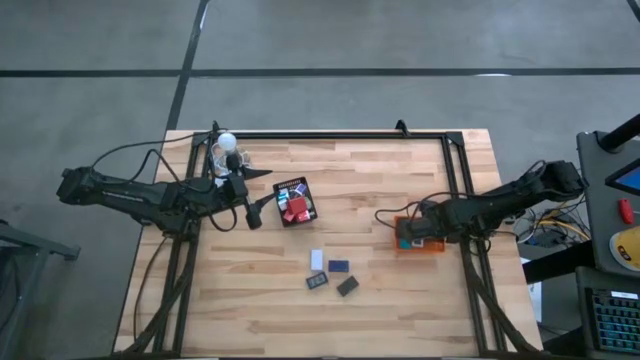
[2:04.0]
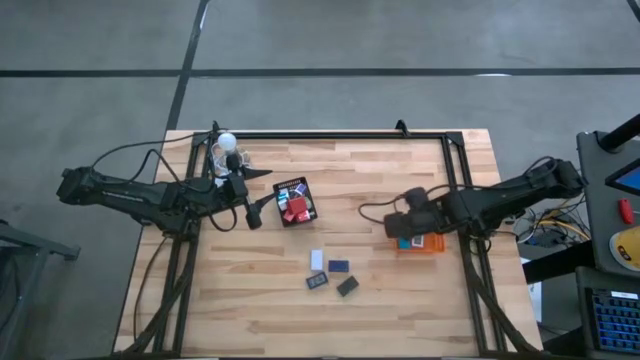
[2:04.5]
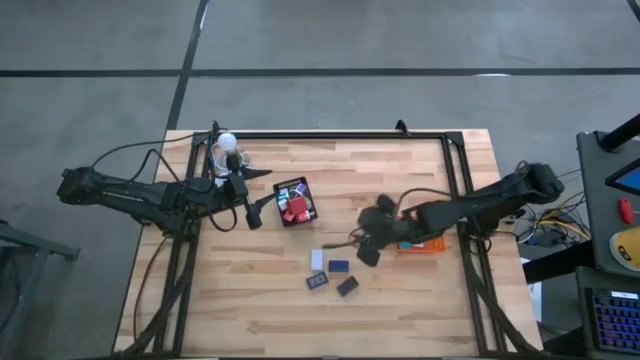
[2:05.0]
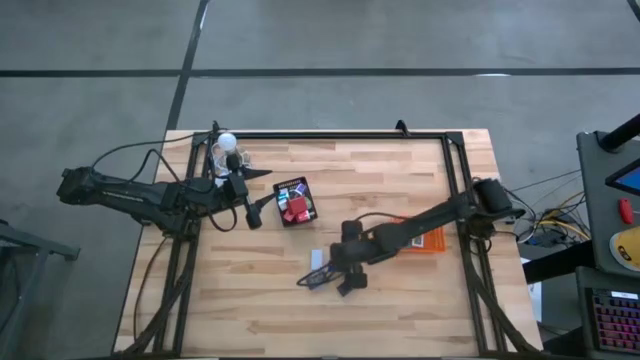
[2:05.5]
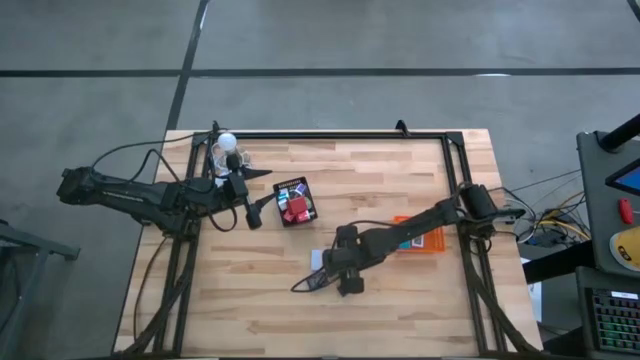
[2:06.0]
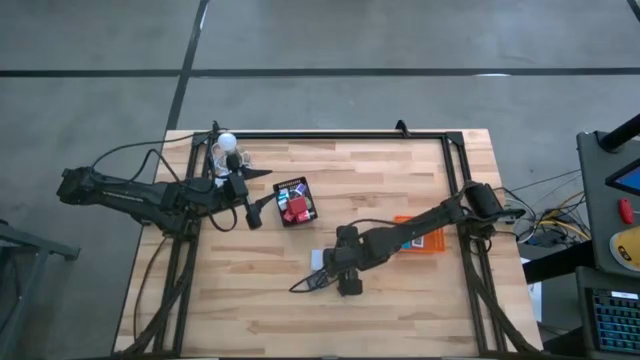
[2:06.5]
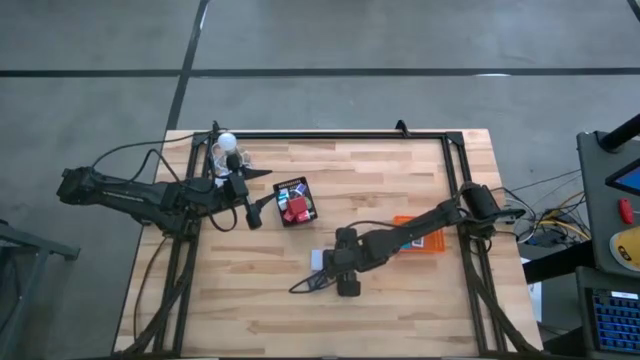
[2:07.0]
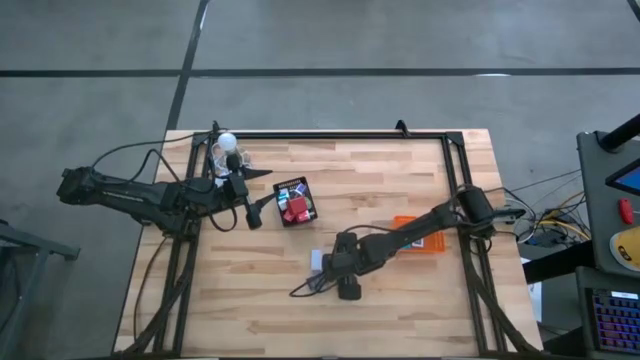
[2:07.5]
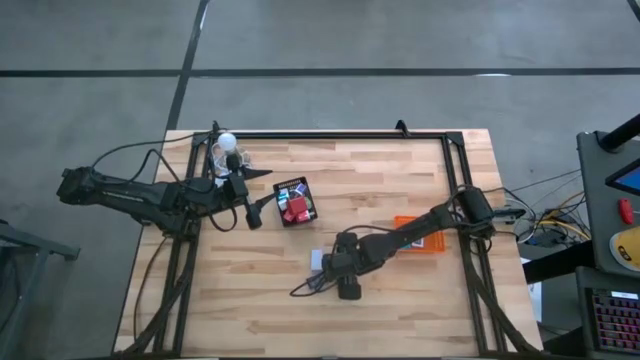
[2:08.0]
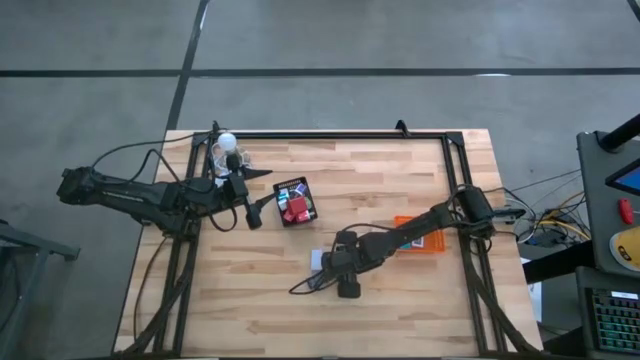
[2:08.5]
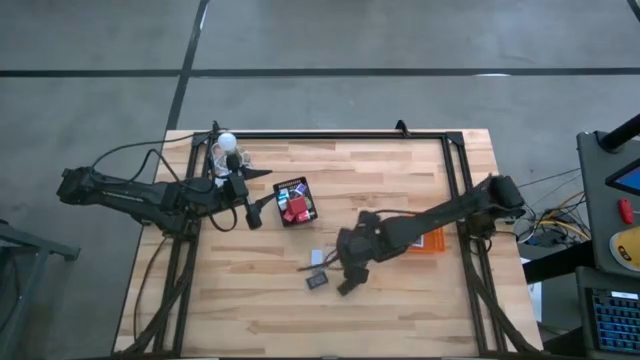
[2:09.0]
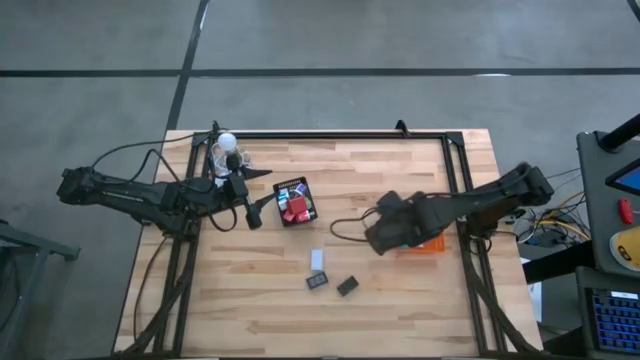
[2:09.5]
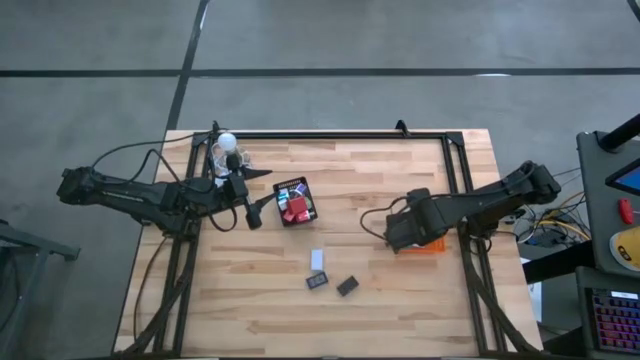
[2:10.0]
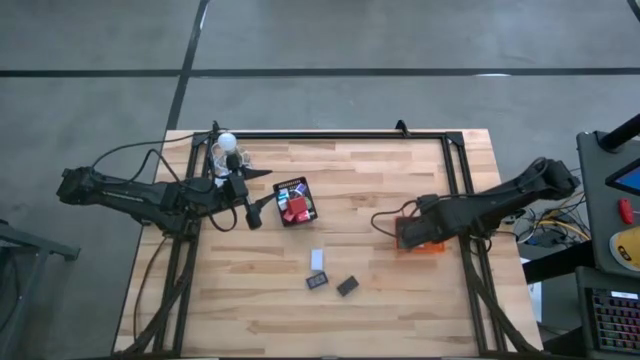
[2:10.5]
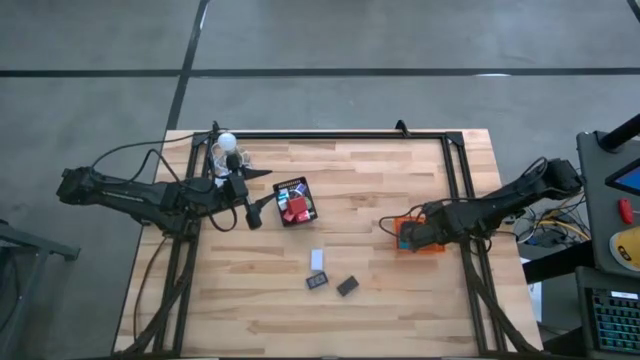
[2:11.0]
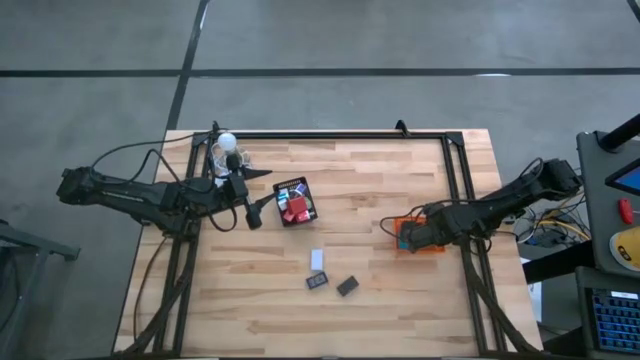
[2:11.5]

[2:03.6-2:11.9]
Task: Pick & Place Office items
Put the right dark blue digital clock in the orange bin

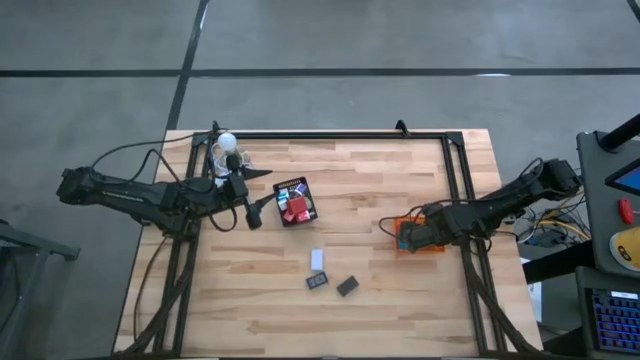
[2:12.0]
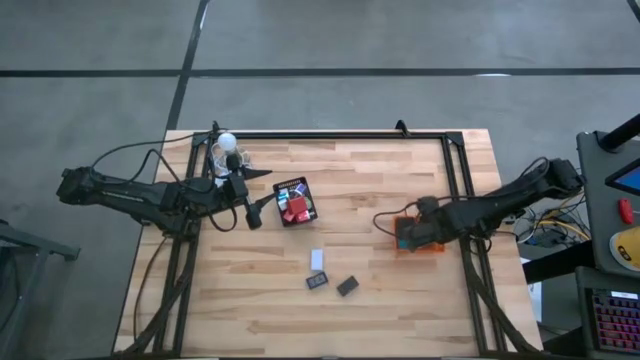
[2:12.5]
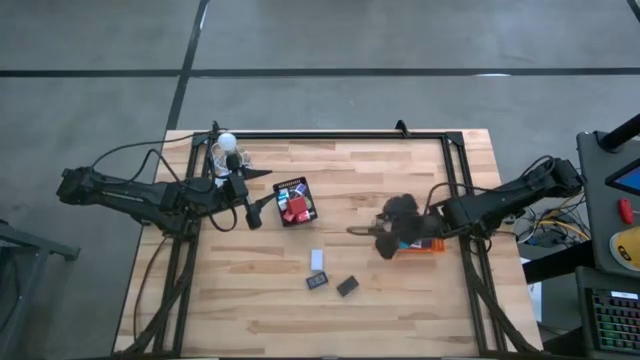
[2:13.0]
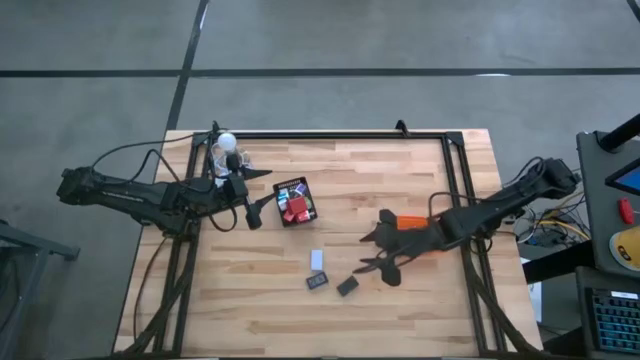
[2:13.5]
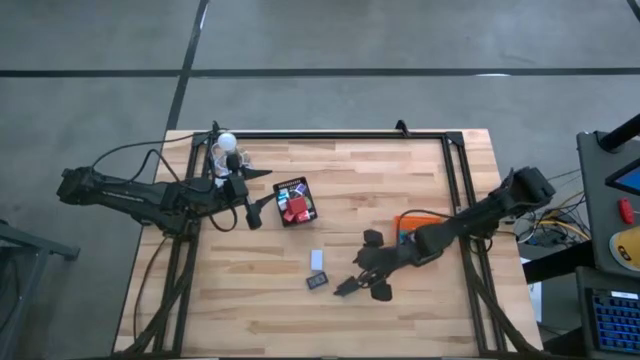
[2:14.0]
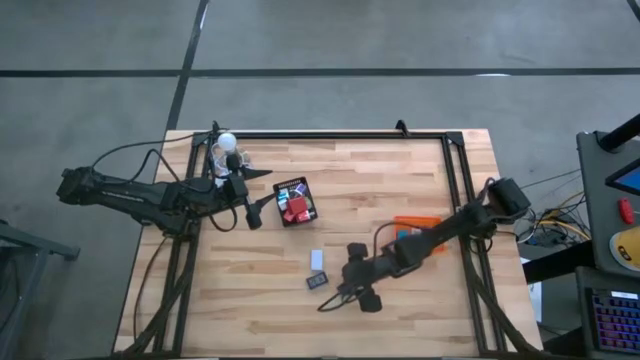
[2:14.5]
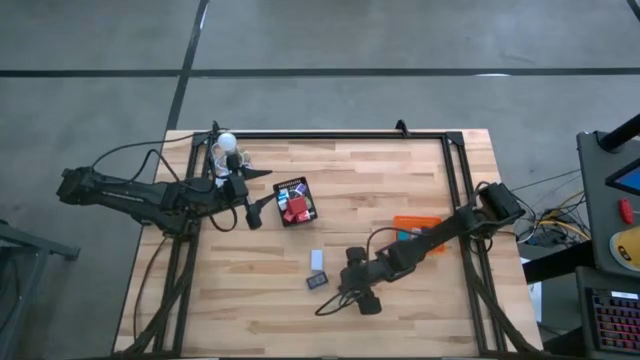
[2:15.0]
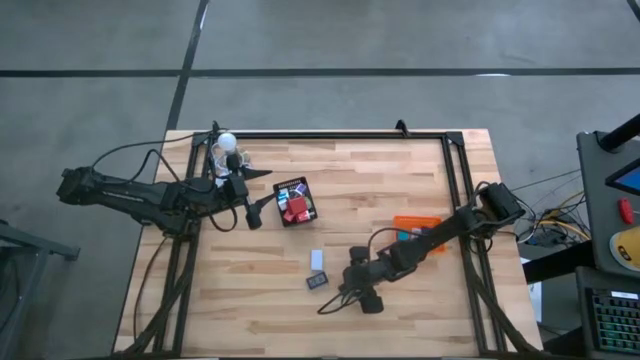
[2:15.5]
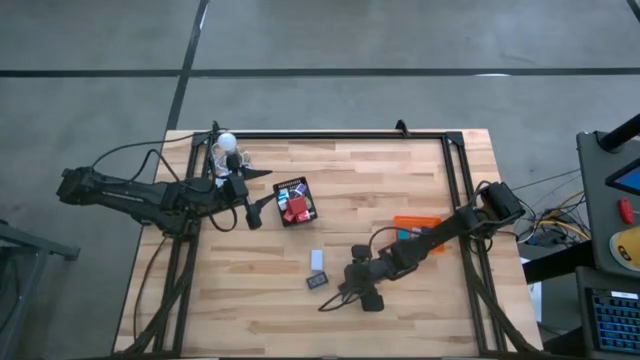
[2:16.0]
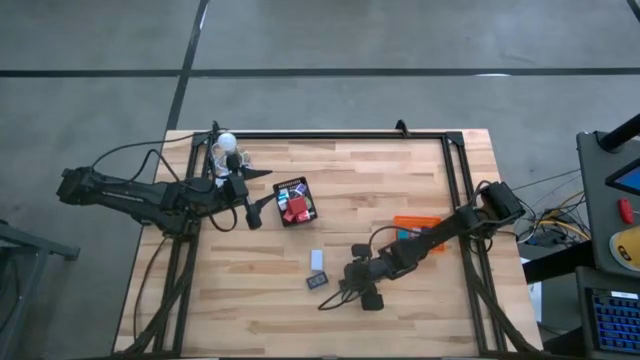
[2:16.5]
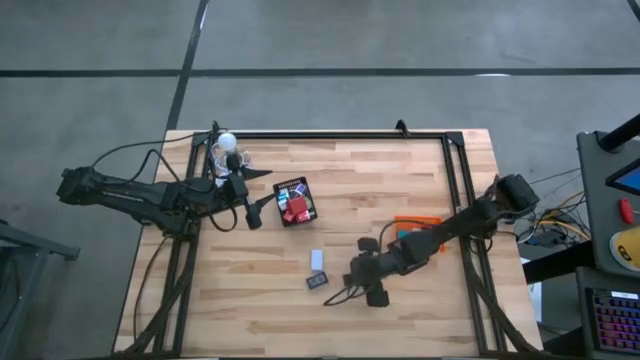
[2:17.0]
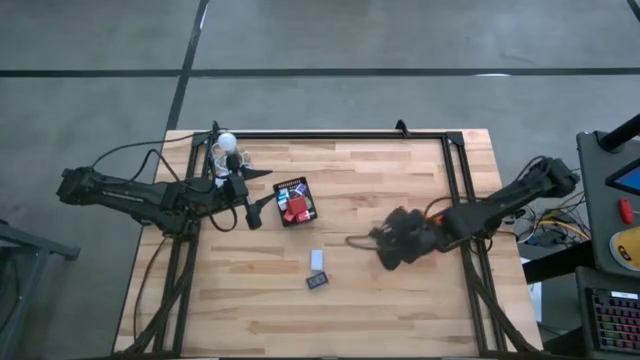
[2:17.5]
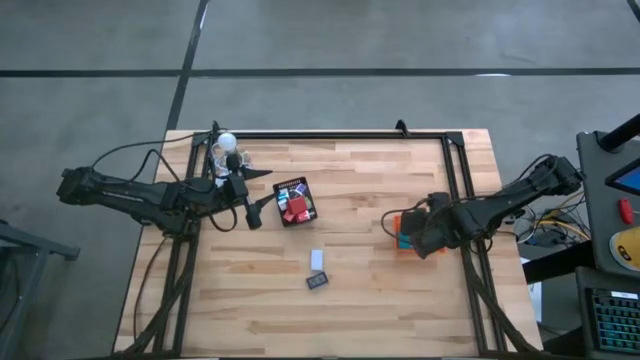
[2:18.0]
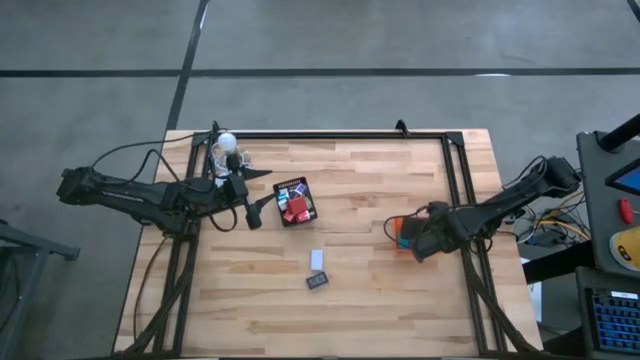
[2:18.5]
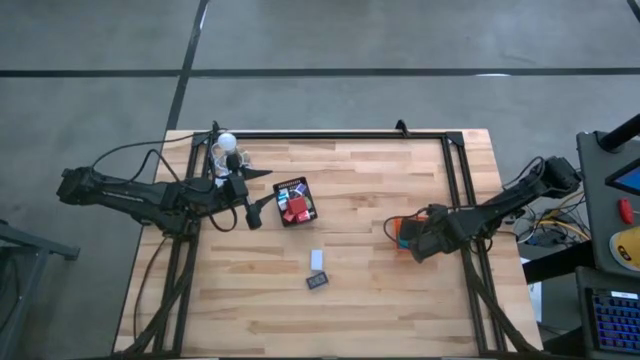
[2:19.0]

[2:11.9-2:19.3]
Put the black digital clock in the orange bin

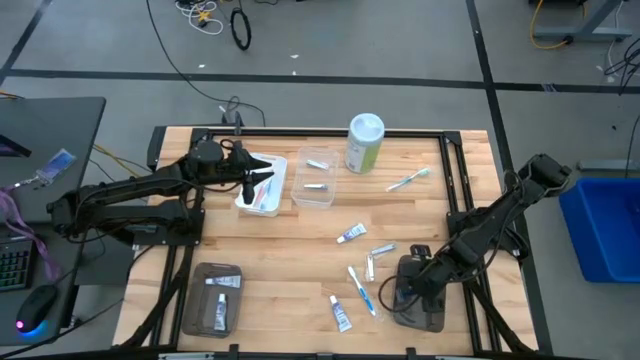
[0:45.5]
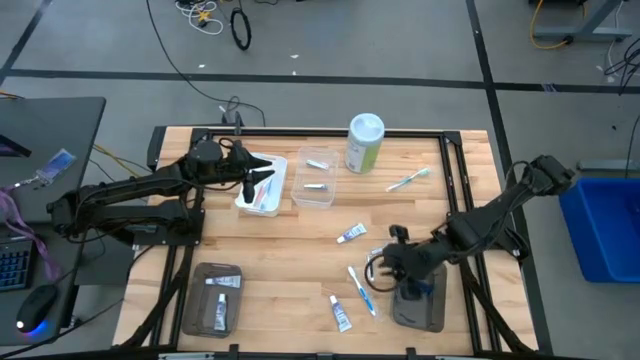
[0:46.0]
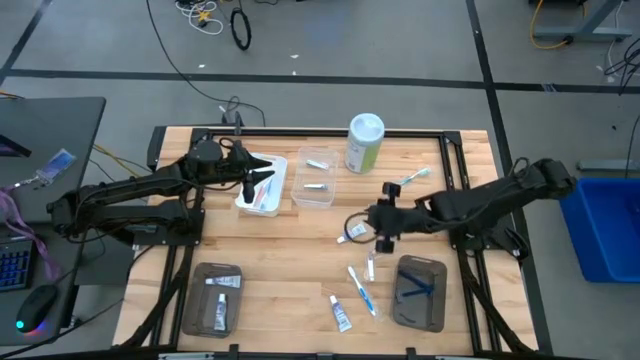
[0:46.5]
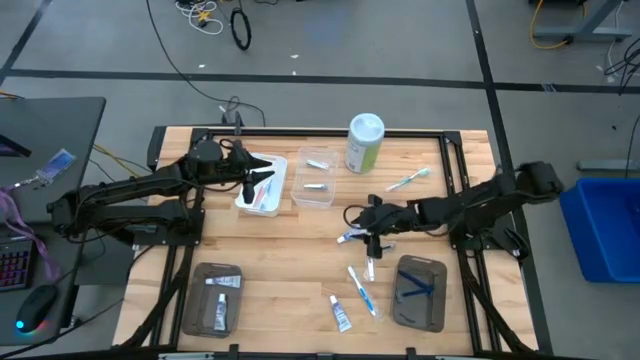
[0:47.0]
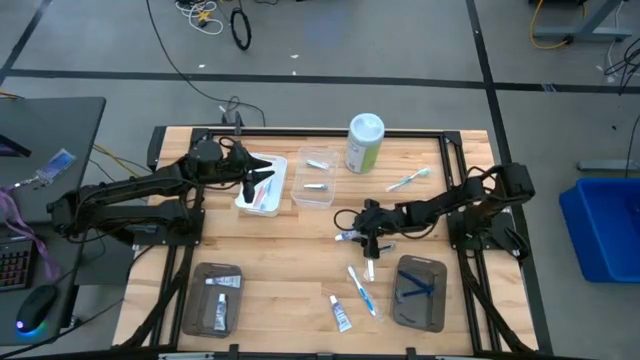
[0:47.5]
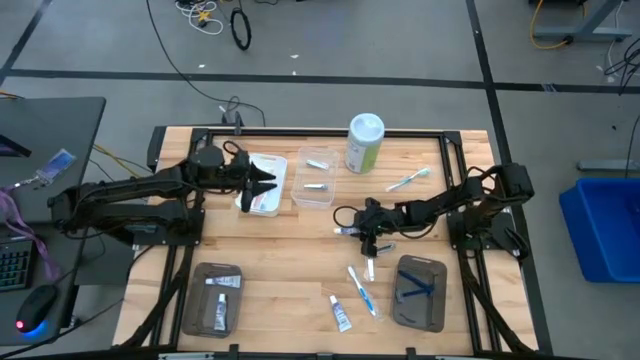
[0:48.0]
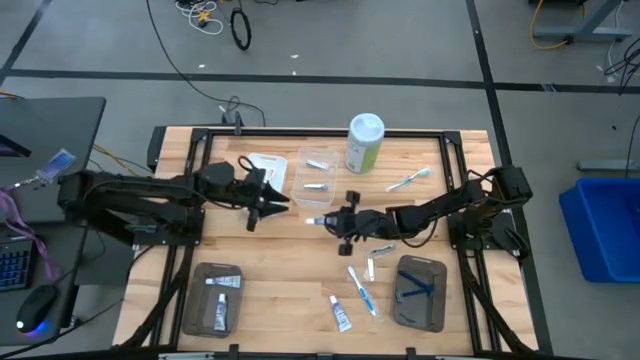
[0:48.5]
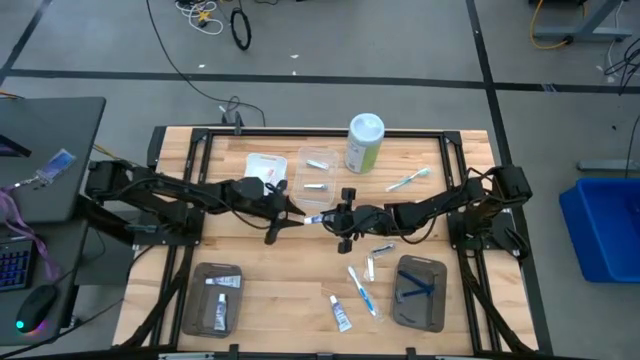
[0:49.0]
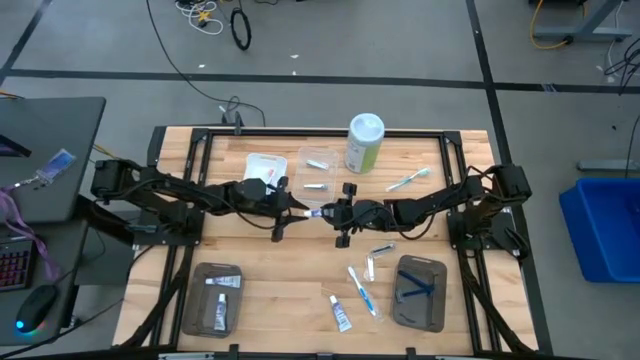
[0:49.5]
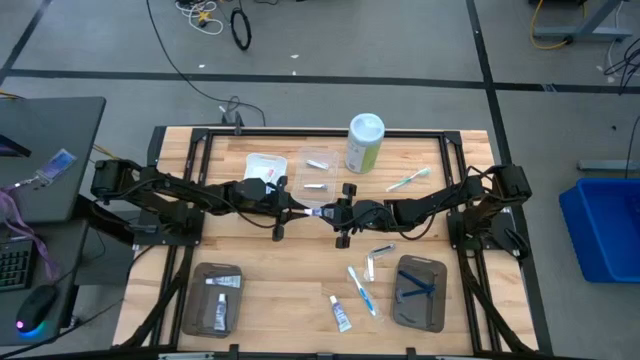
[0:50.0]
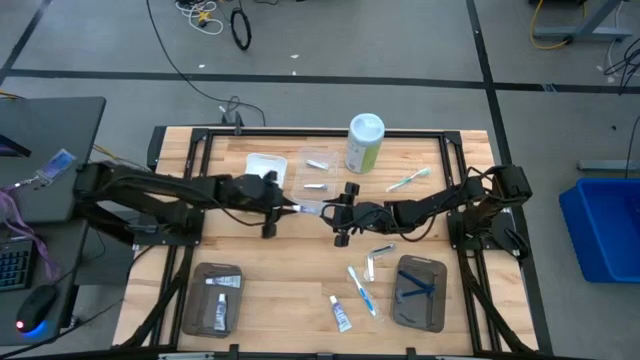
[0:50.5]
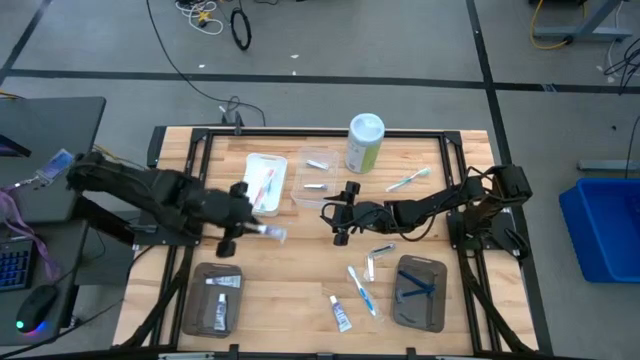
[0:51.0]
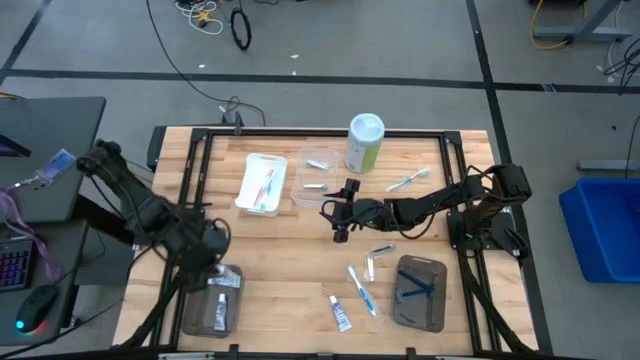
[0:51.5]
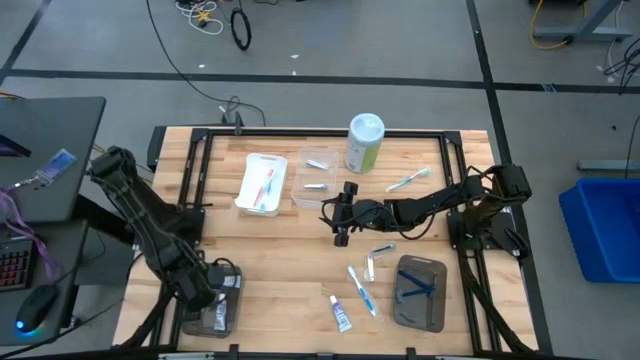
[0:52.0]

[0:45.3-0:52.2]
Task: Pick & Place Travel size toiletries
Put the top white toothpaste into the left black bin
